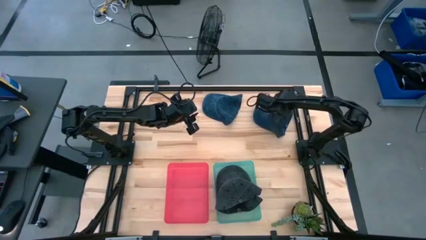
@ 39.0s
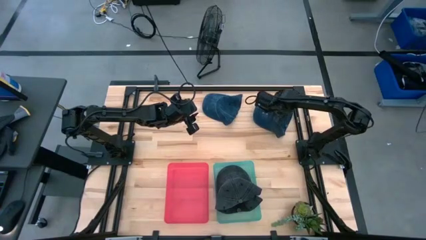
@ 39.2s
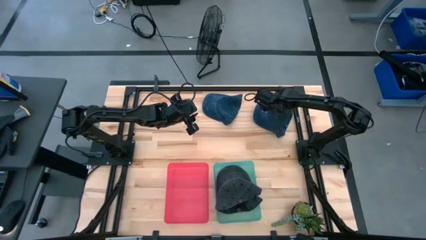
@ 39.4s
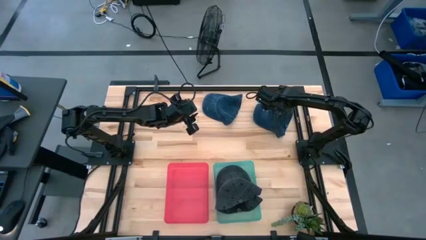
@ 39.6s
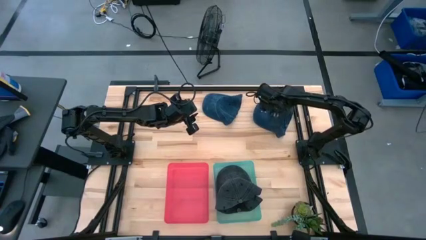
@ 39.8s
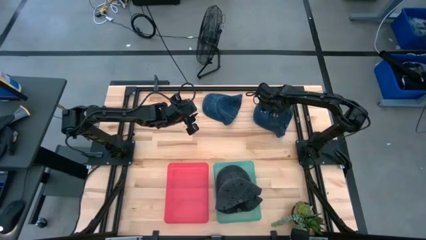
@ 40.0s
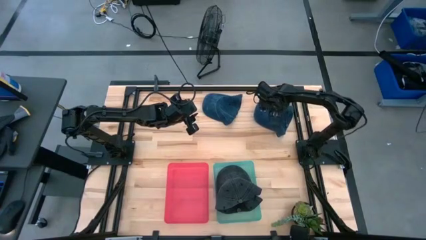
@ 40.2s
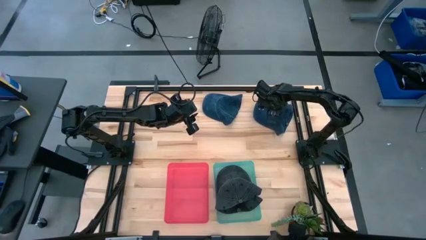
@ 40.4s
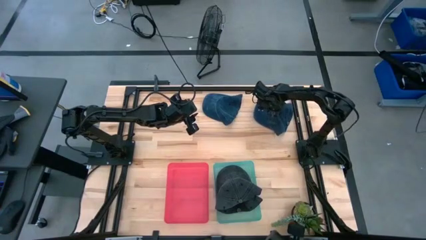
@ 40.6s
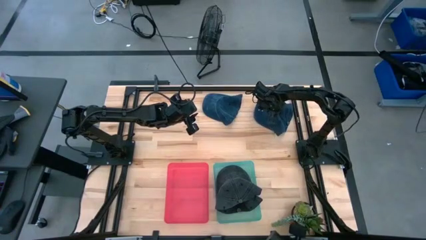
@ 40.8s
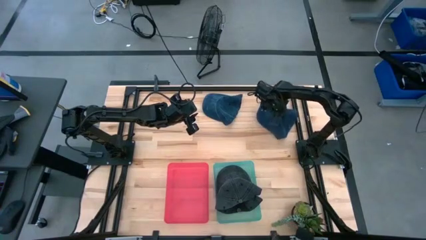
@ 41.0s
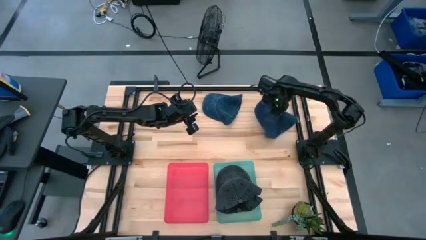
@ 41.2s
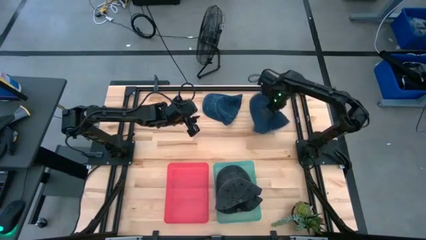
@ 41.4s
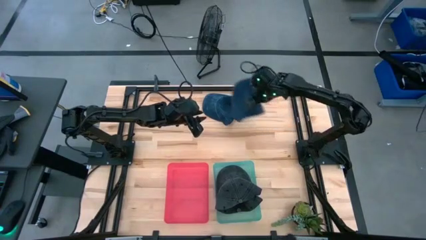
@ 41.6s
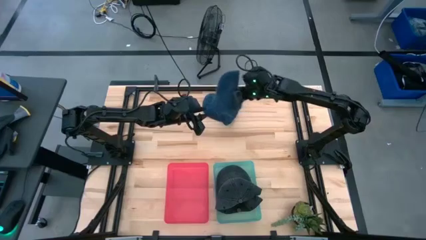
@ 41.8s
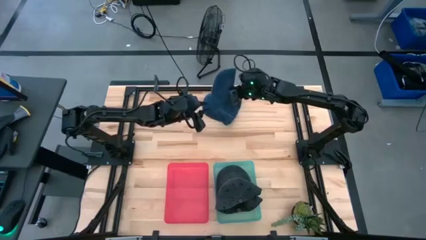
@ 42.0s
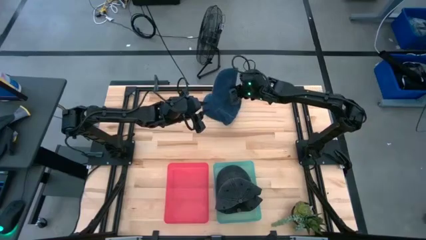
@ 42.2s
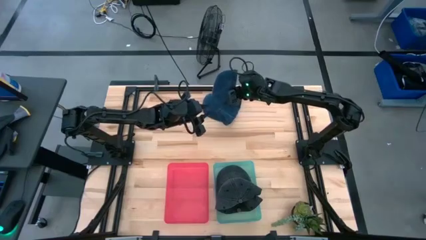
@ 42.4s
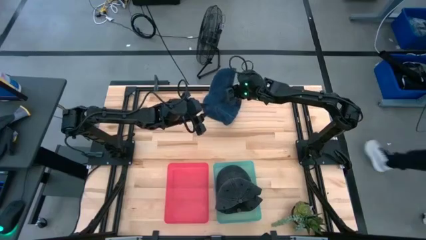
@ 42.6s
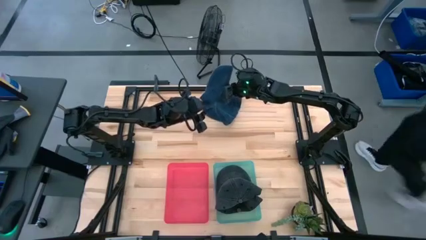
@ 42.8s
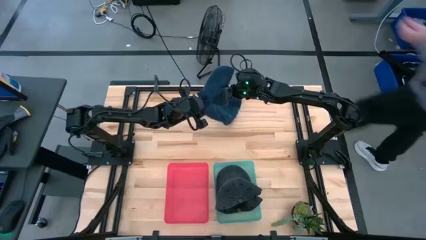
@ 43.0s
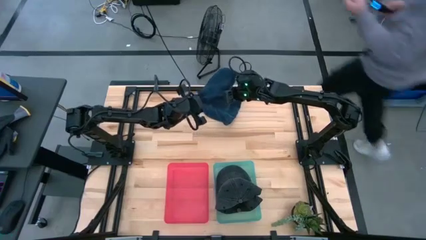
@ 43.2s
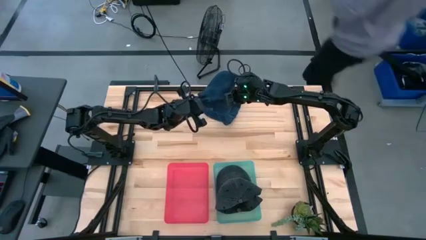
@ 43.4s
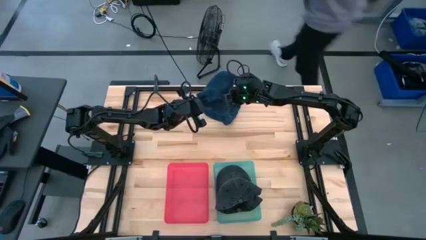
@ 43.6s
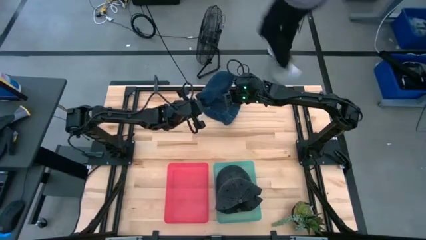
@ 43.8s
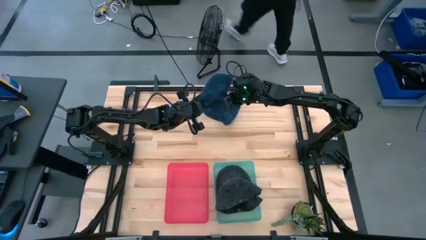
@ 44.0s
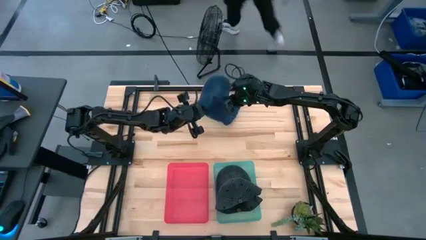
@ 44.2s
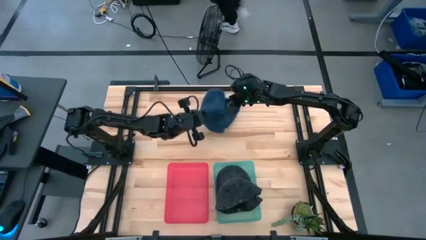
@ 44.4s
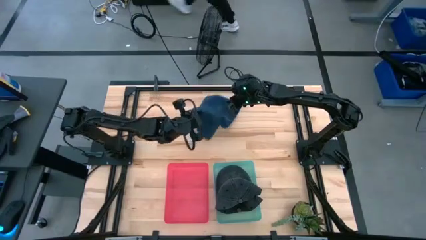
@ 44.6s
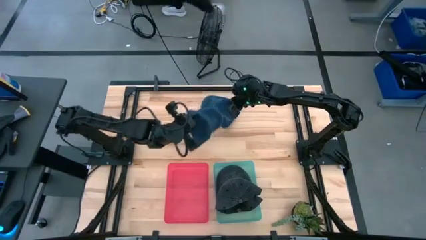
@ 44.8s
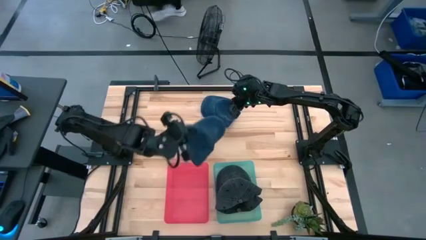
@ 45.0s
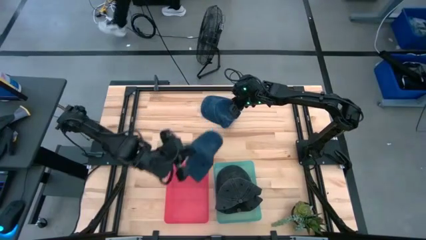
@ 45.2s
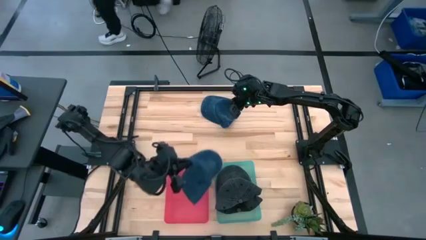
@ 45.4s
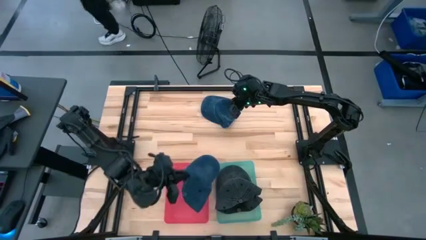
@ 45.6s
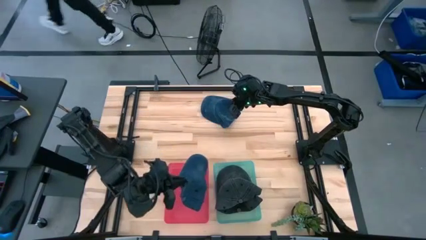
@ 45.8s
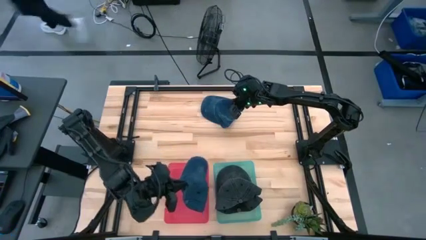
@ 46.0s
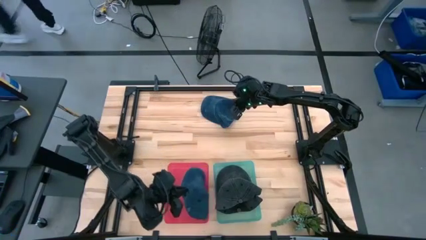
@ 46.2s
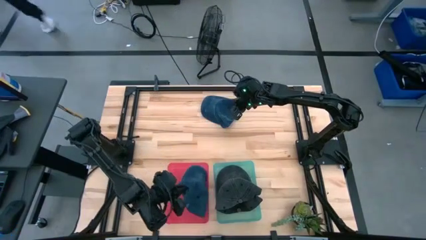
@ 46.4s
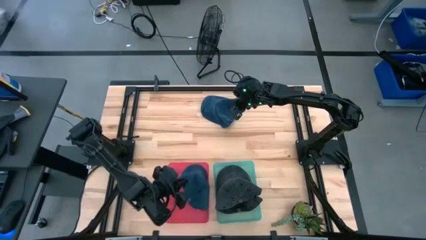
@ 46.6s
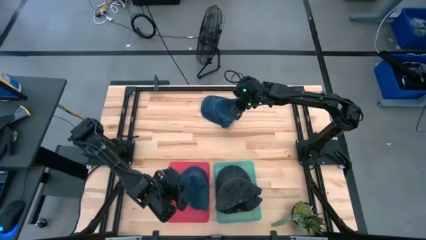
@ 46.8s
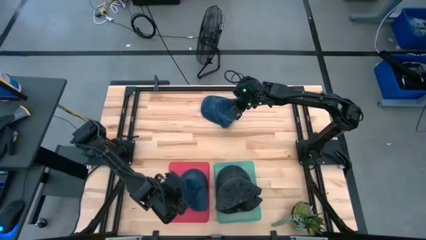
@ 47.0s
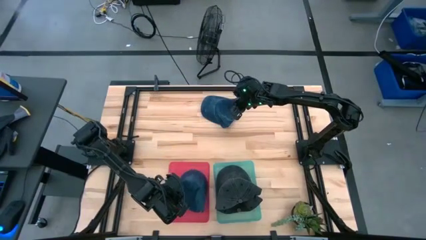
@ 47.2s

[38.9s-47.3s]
Task: Pick & Place hat
Put the right blue cap into the pink bin

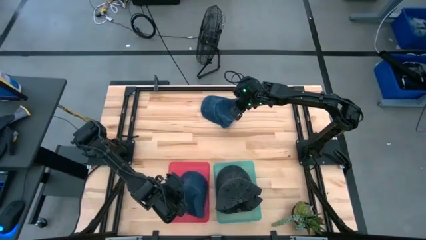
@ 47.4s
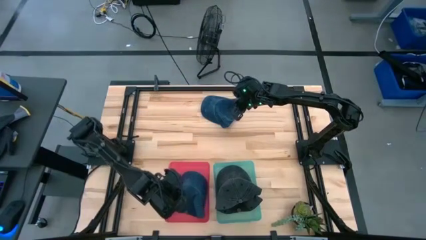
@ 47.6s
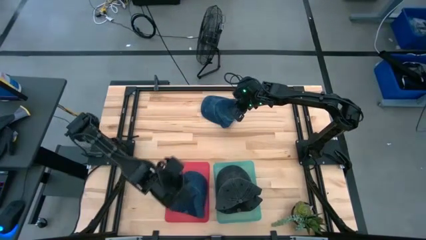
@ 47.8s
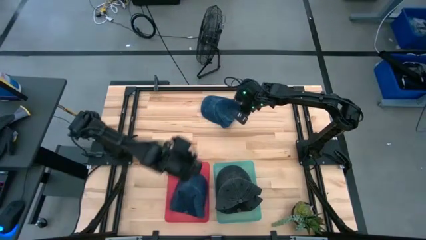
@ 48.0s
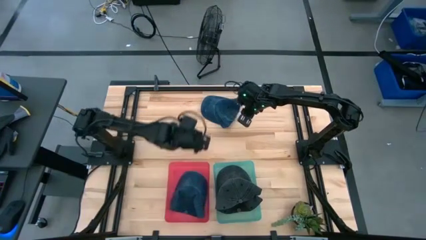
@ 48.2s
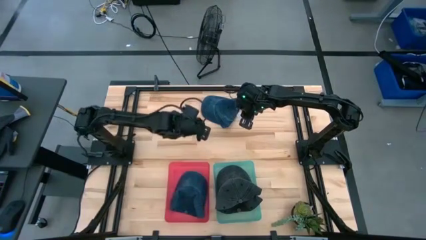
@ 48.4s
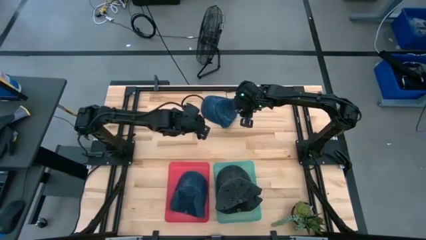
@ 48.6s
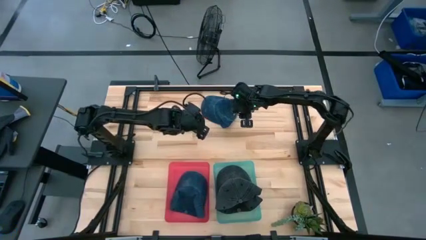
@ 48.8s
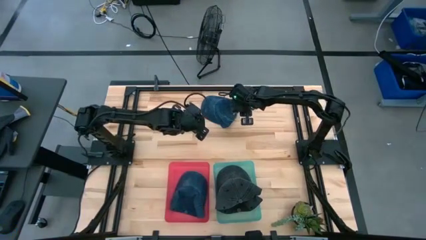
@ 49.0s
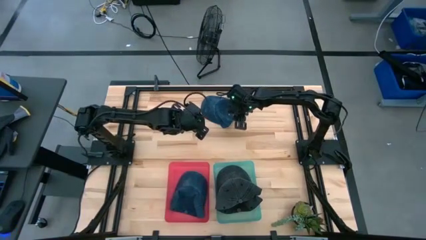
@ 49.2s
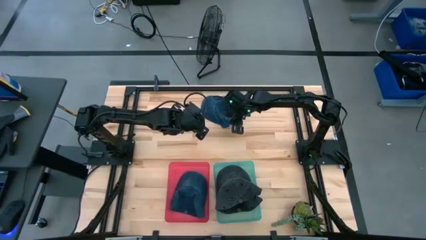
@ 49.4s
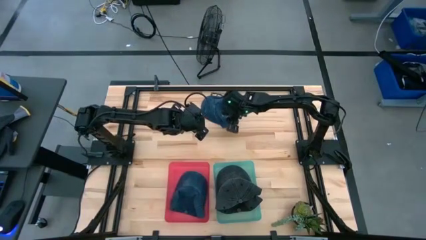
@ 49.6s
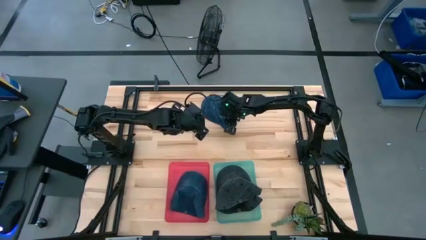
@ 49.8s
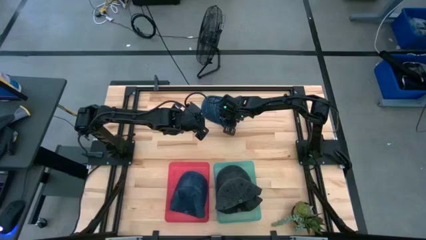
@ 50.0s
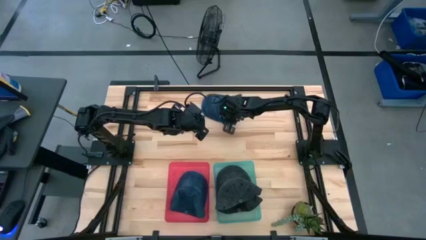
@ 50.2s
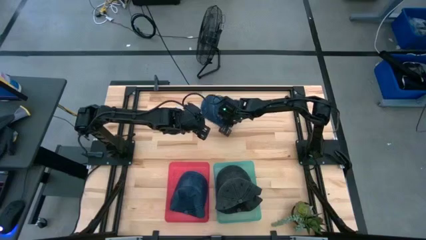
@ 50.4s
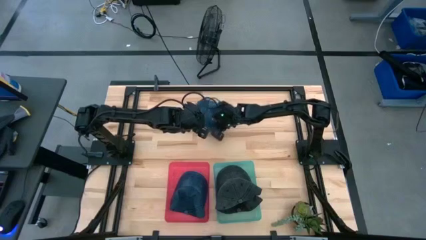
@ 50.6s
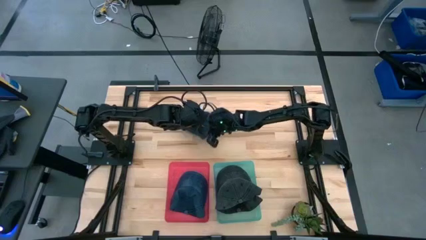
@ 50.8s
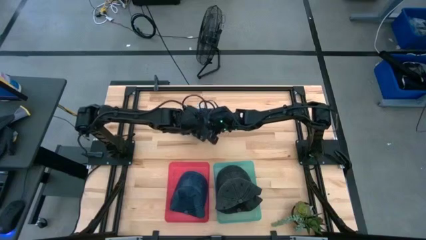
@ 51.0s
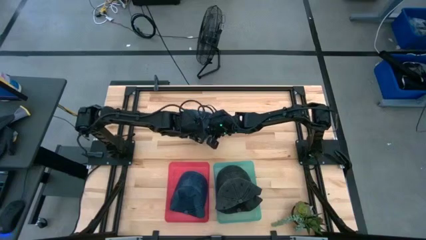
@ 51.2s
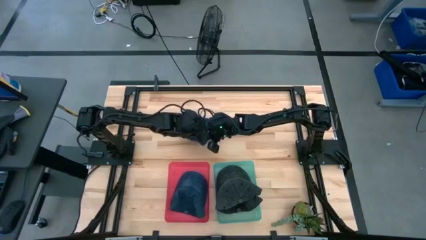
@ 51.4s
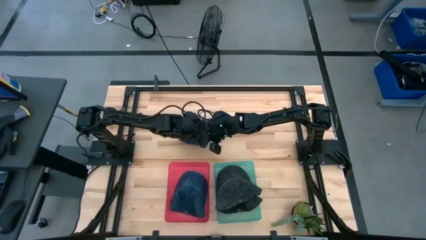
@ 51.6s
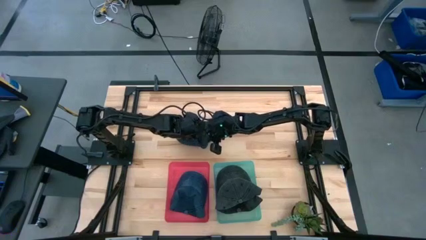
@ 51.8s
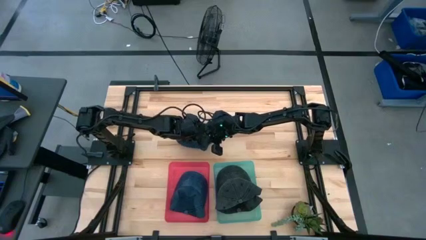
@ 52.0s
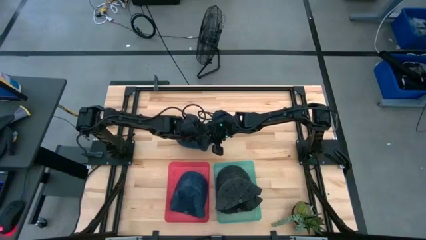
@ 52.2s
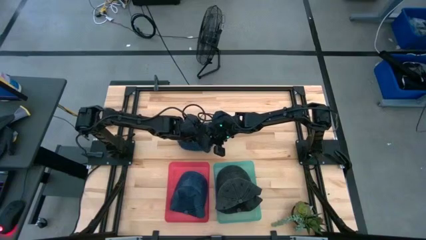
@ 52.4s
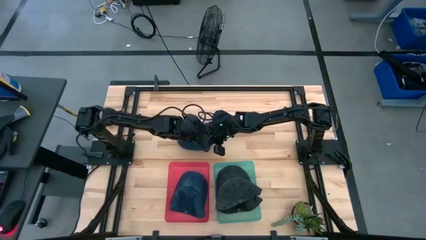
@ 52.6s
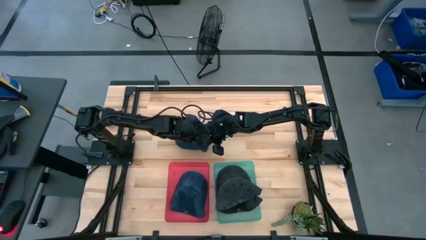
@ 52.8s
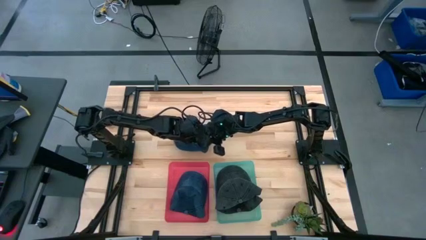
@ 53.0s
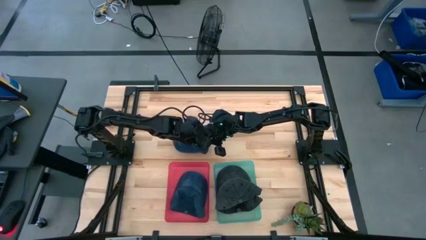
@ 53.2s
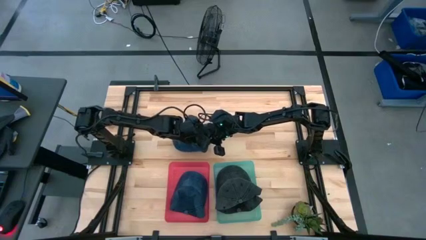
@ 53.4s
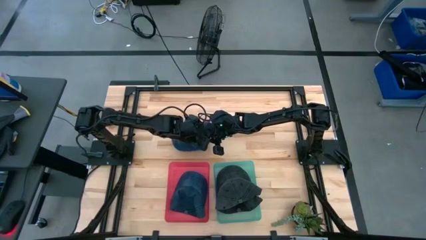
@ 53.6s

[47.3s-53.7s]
Put the blue cap into the pink bin

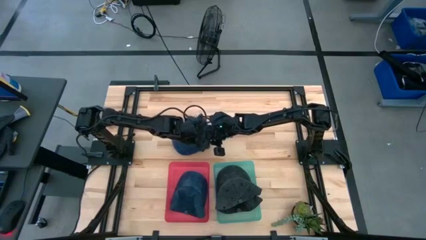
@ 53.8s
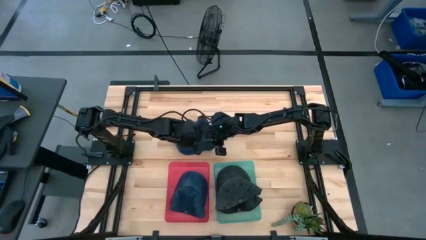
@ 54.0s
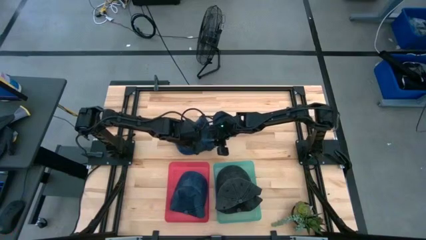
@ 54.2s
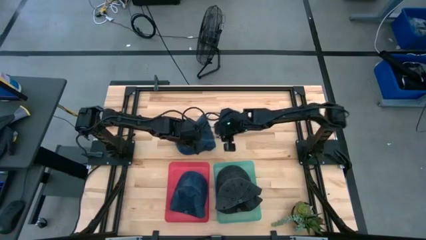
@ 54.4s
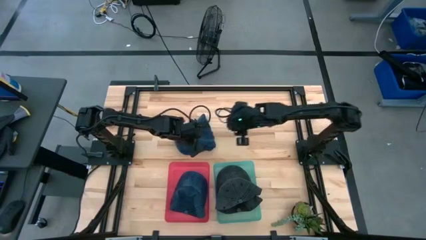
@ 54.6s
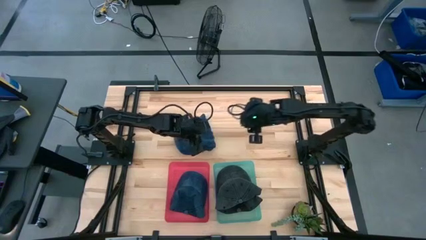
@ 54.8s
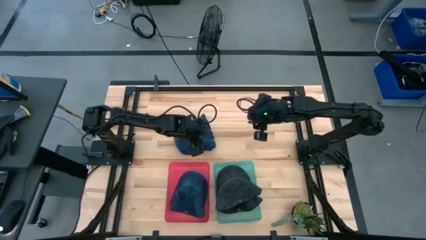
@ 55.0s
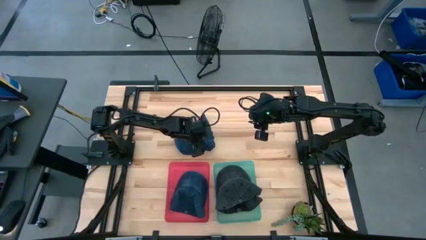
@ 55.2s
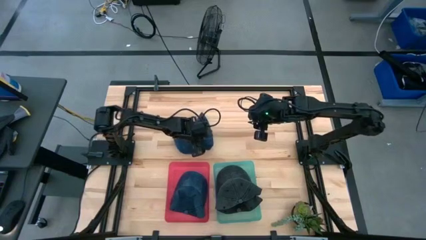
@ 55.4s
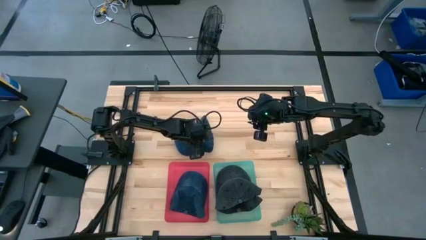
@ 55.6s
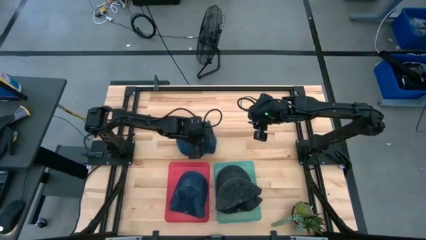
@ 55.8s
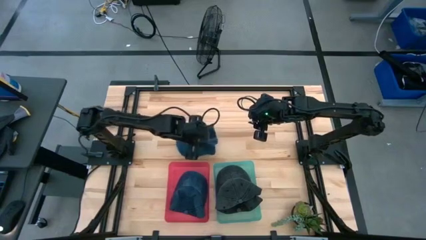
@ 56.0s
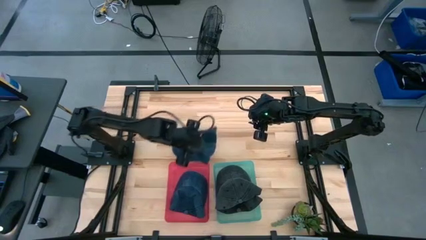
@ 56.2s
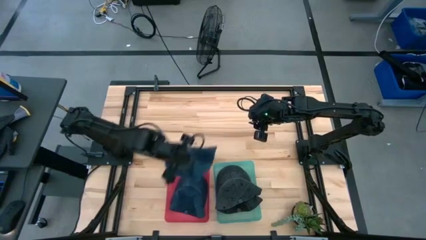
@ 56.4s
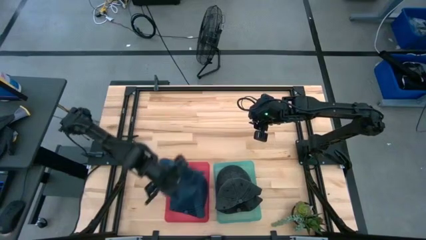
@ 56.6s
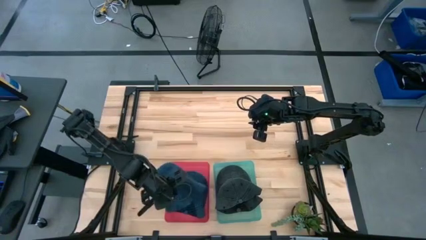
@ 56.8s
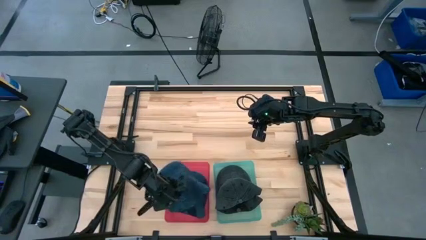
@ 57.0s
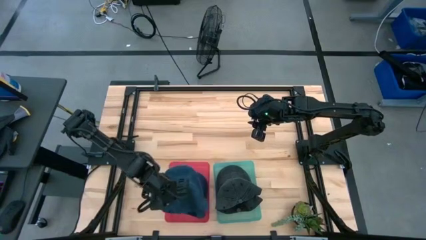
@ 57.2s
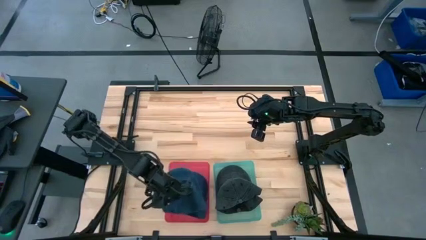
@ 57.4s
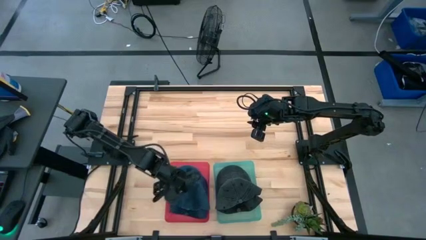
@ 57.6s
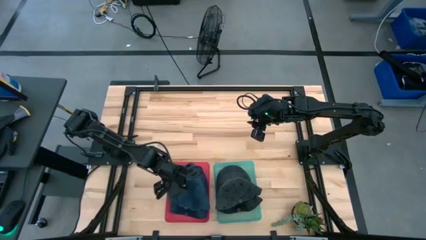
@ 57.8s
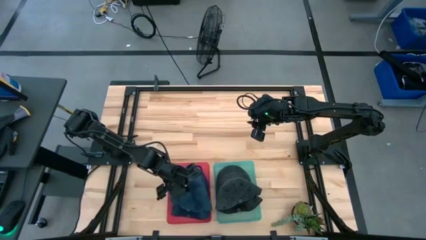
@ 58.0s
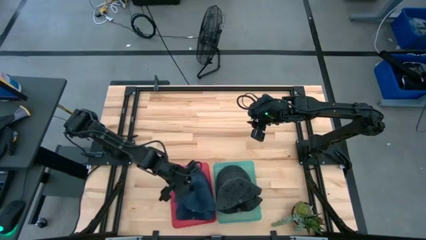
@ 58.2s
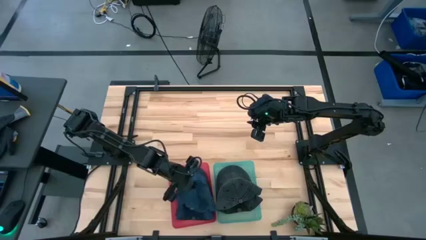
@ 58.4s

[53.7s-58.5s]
Put the blue cap into the pink bin
